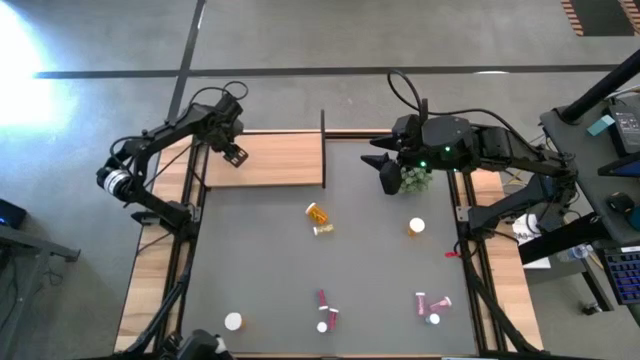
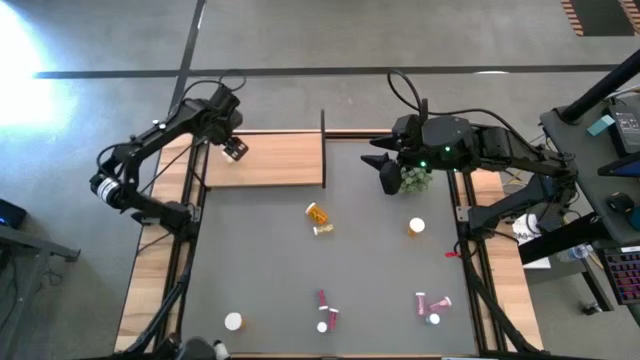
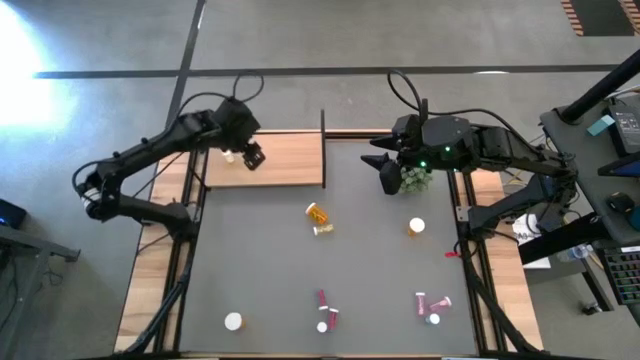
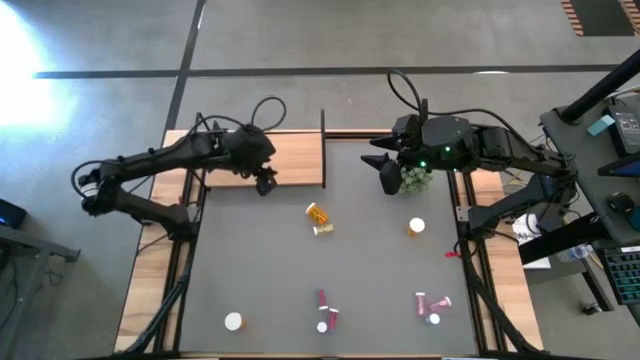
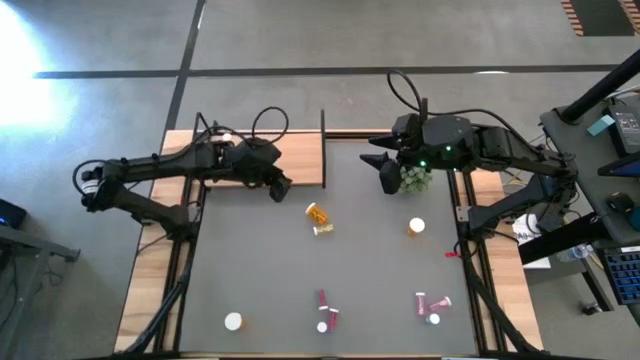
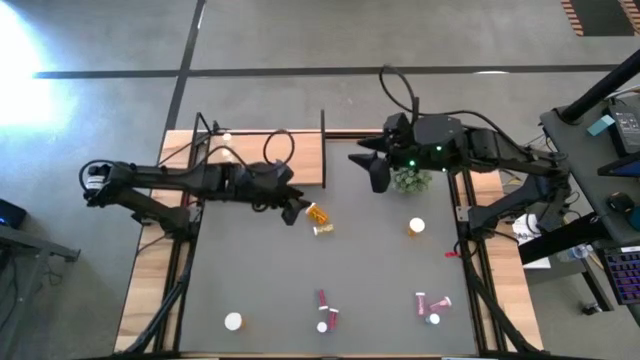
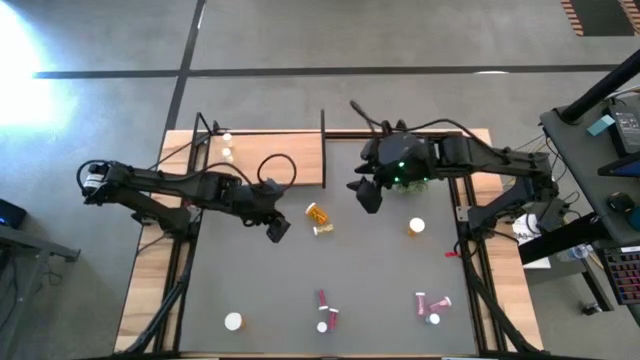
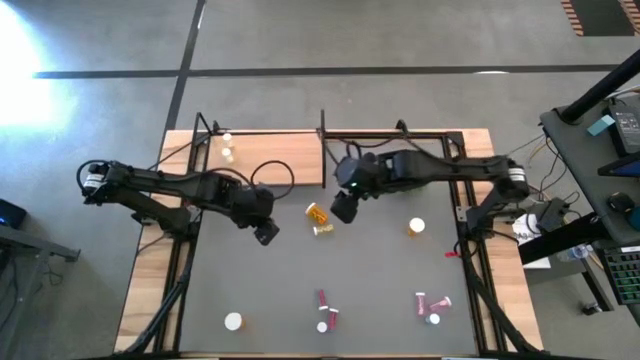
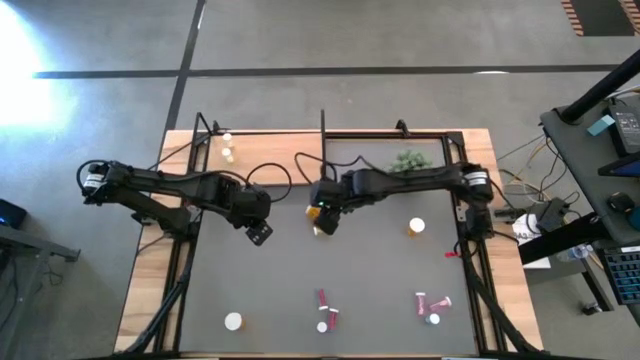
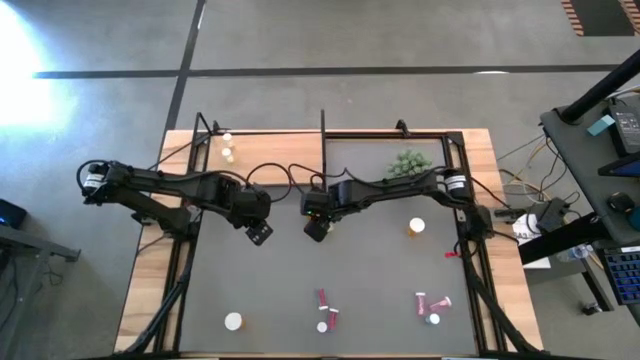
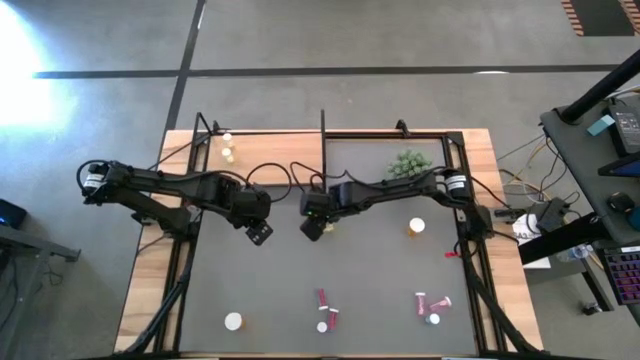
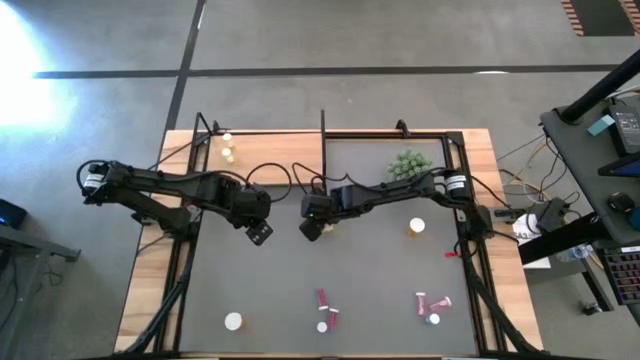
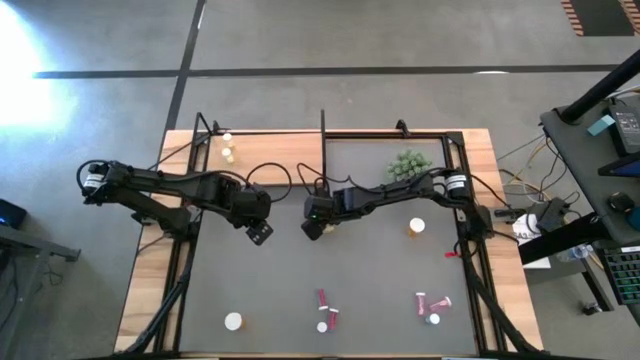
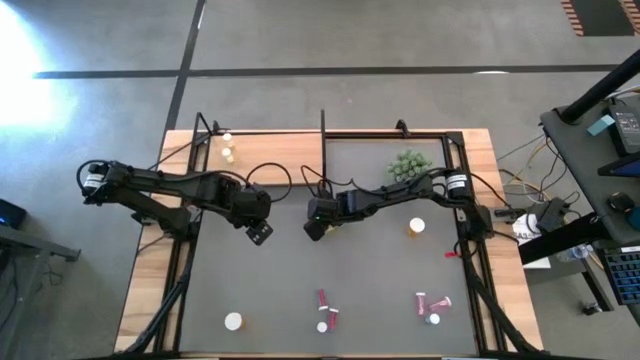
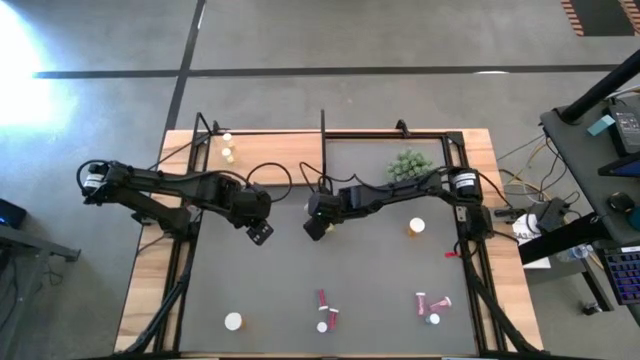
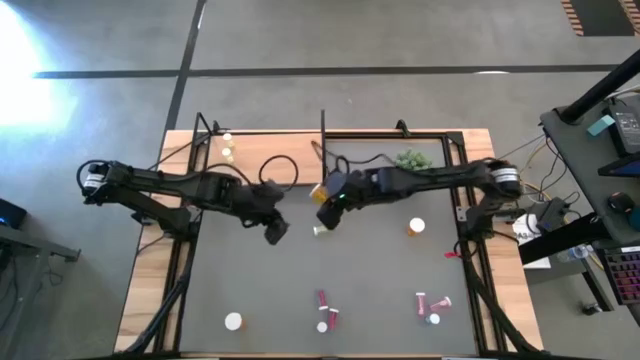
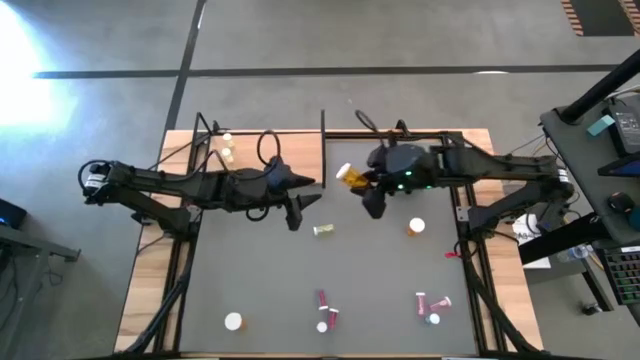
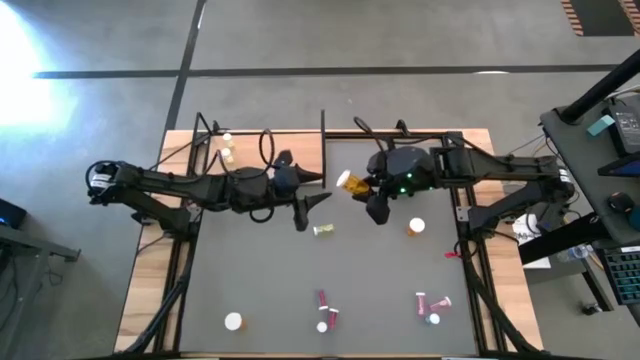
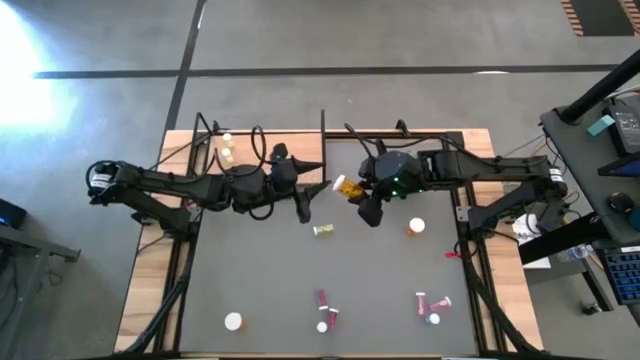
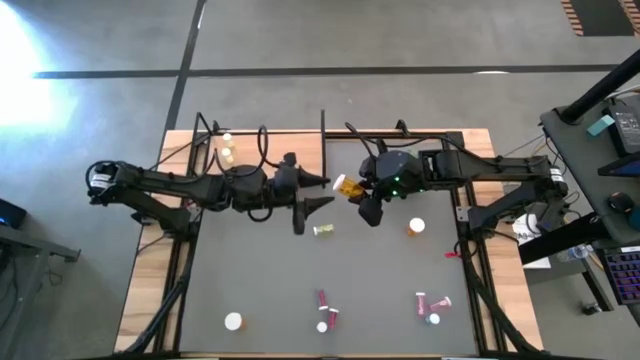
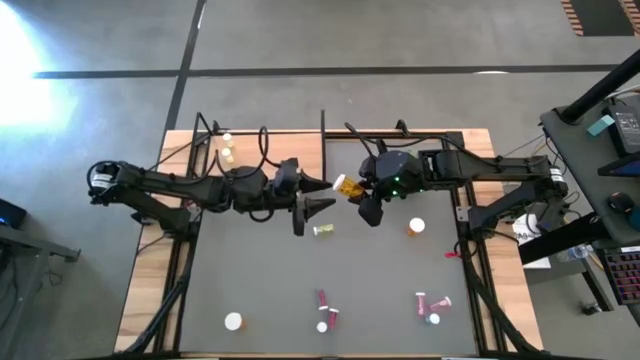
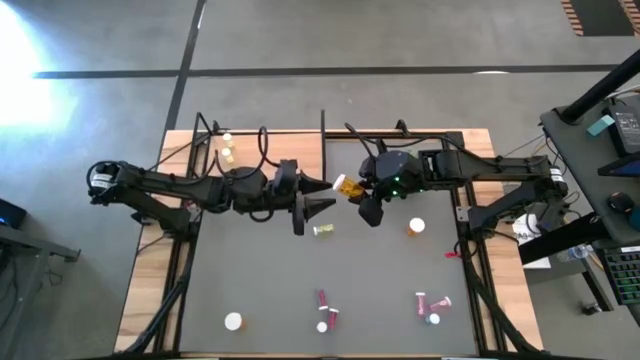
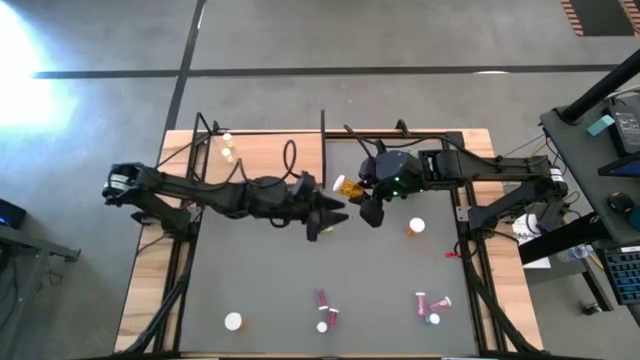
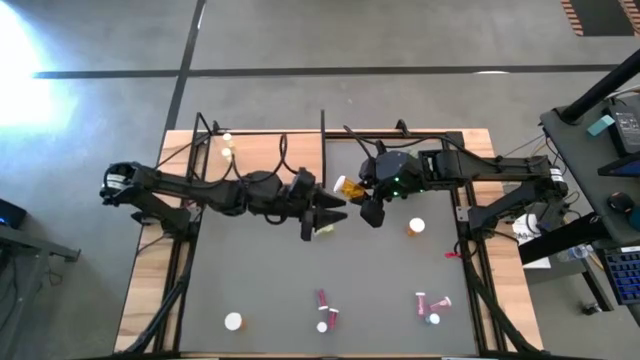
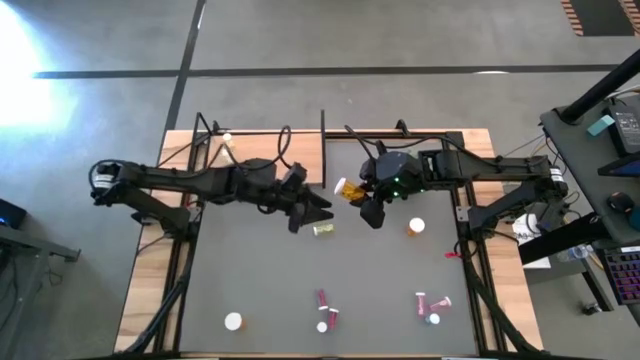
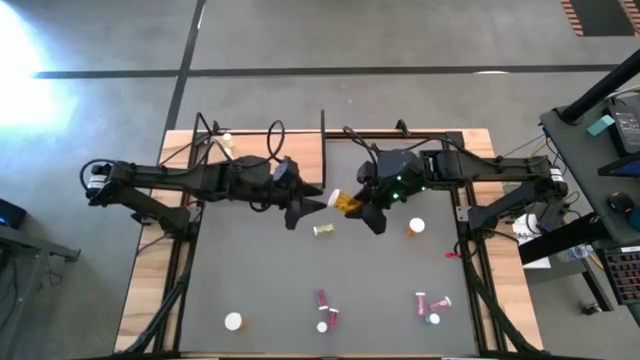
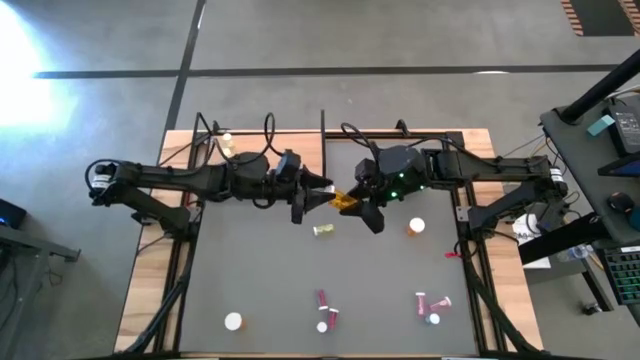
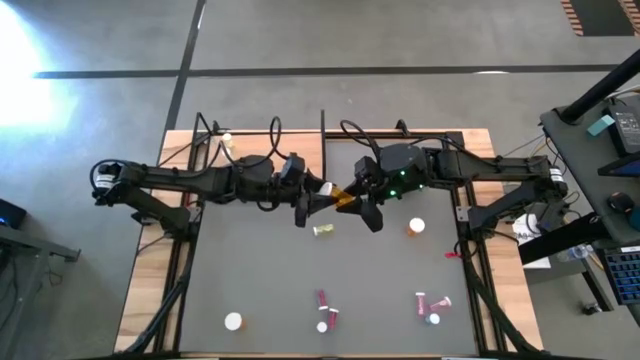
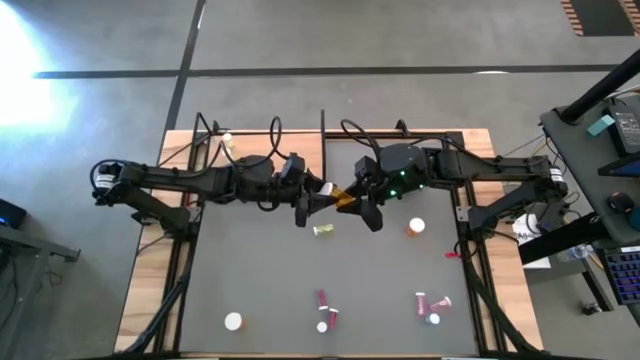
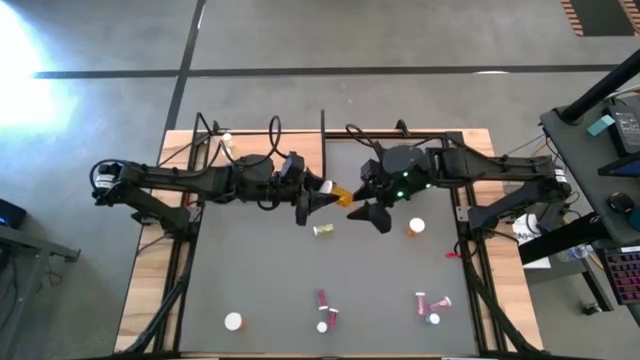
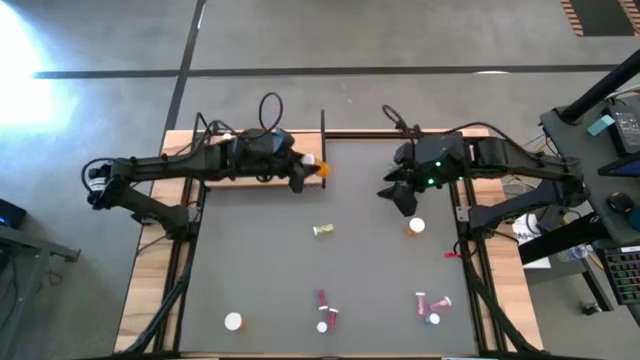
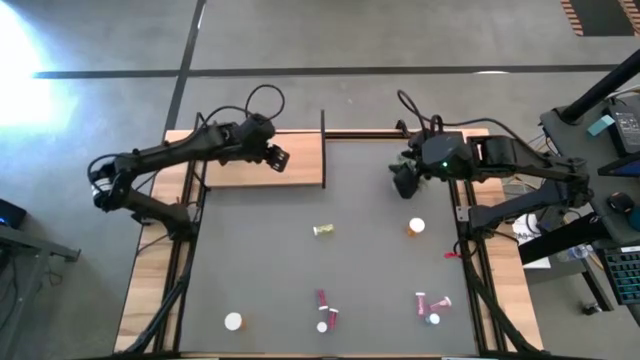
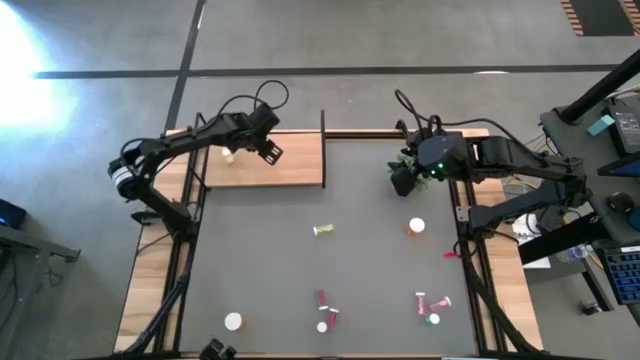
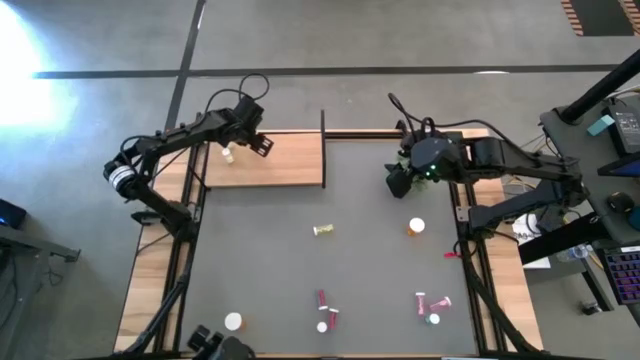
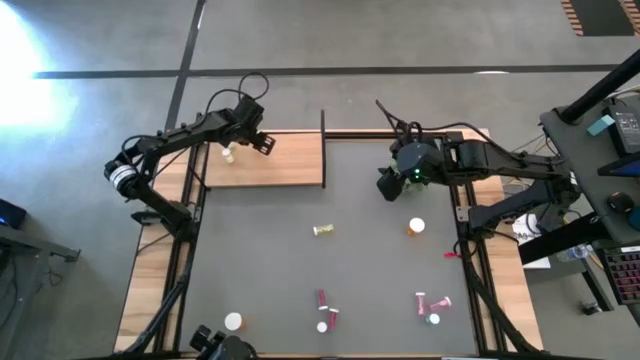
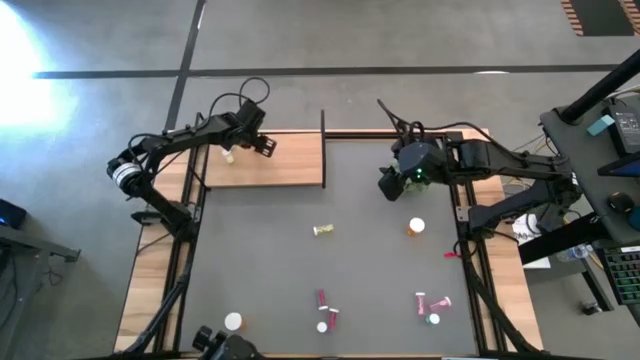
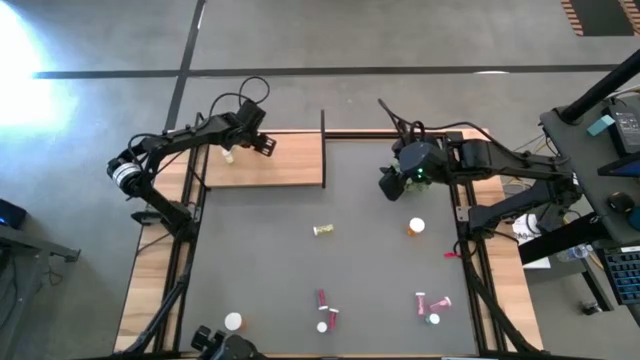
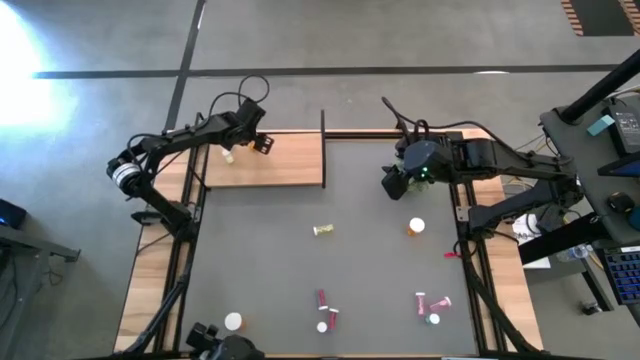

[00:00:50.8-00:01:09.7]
Task: Pick and place medicine bottles onto shelf by color
Put the top left orange pill bottle on the shelf
